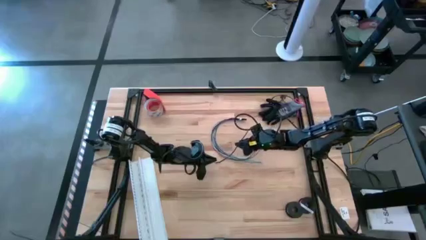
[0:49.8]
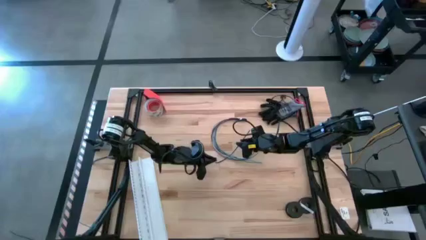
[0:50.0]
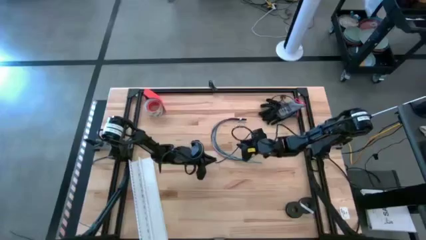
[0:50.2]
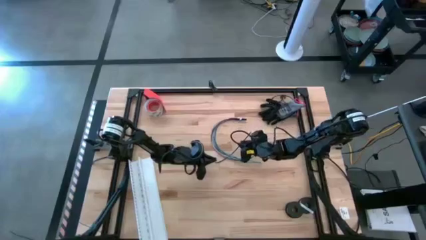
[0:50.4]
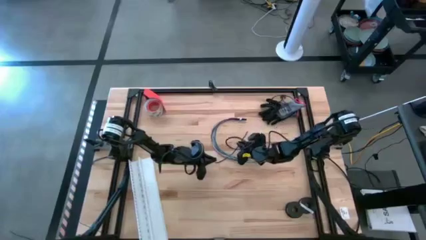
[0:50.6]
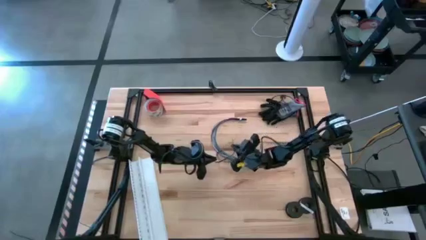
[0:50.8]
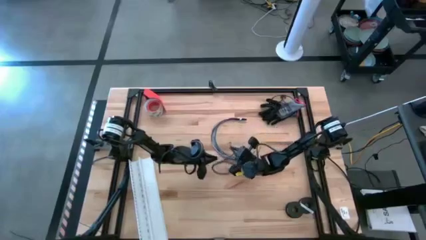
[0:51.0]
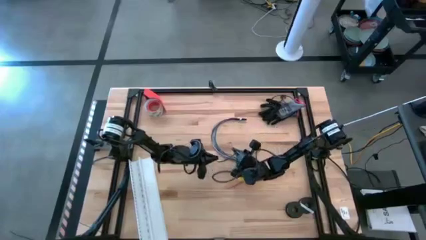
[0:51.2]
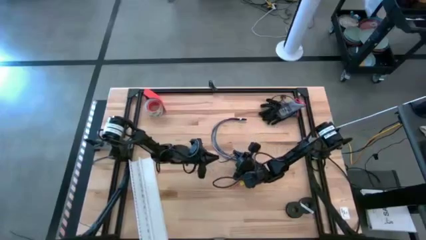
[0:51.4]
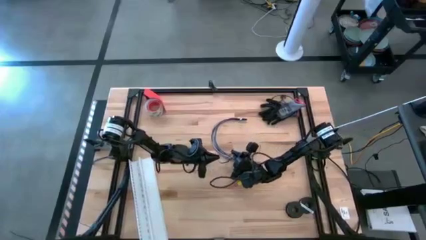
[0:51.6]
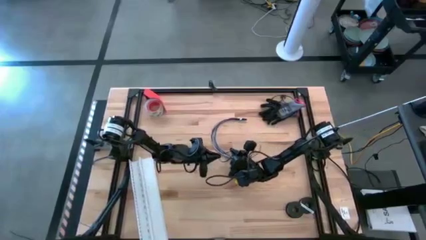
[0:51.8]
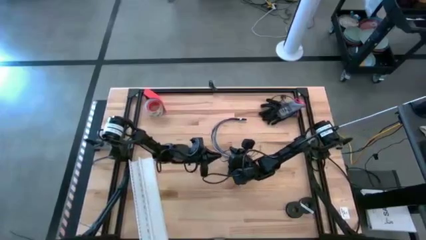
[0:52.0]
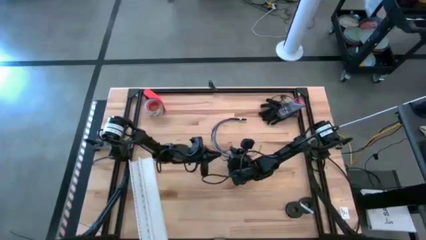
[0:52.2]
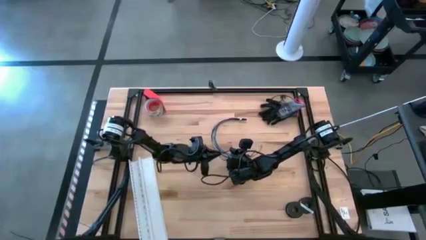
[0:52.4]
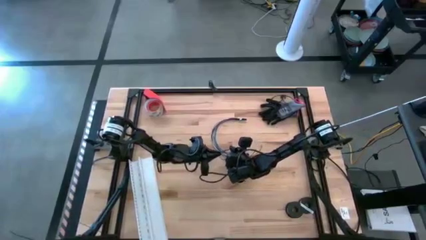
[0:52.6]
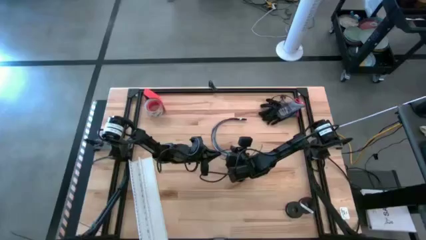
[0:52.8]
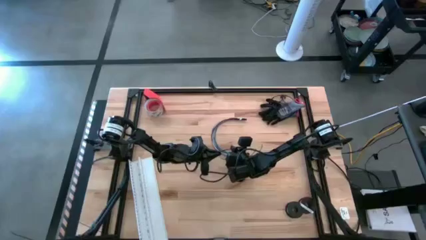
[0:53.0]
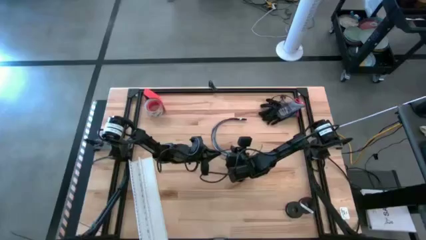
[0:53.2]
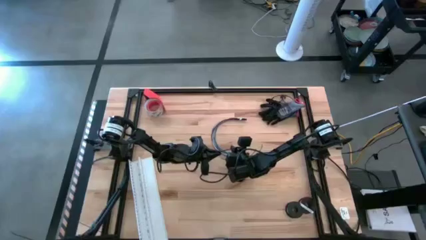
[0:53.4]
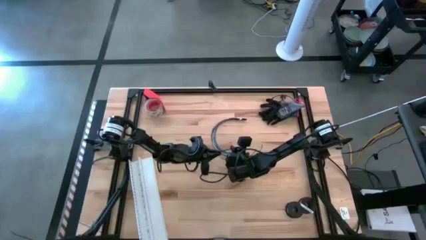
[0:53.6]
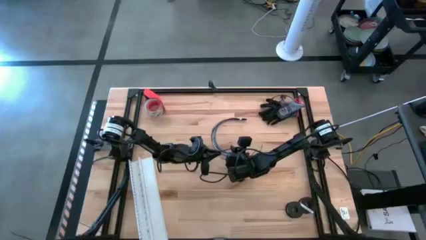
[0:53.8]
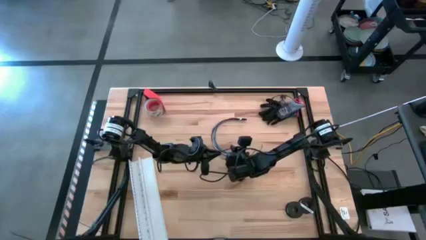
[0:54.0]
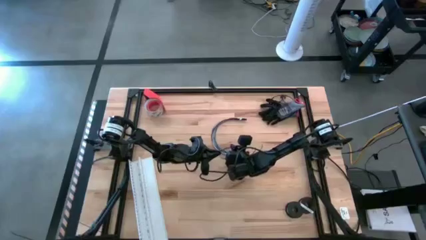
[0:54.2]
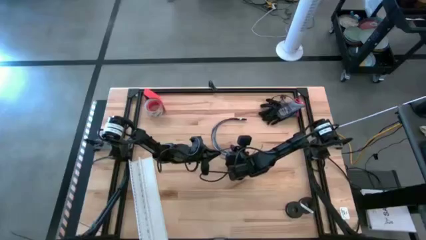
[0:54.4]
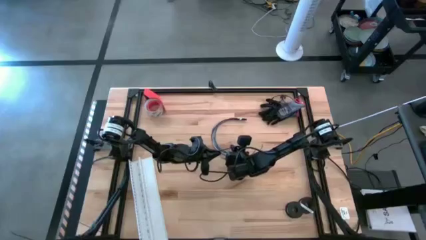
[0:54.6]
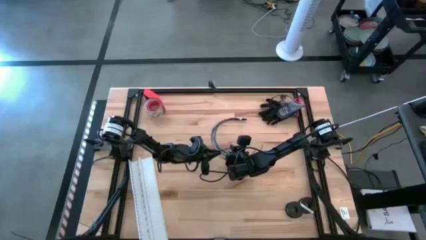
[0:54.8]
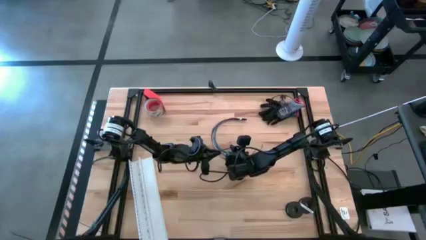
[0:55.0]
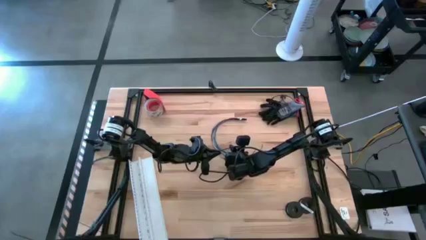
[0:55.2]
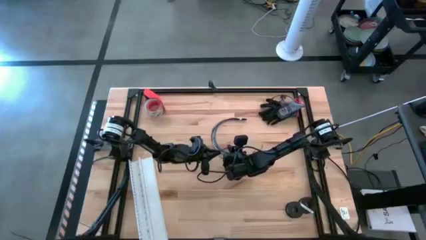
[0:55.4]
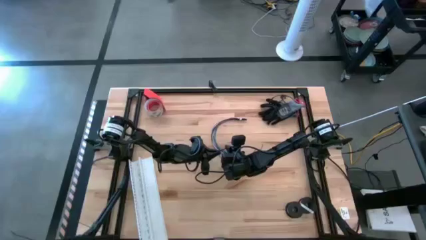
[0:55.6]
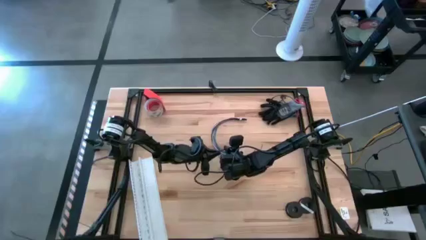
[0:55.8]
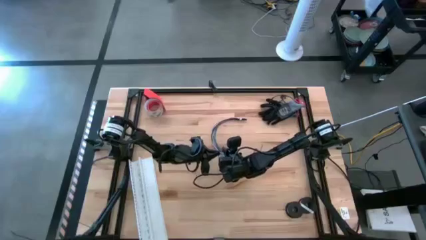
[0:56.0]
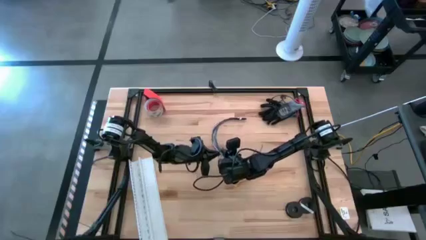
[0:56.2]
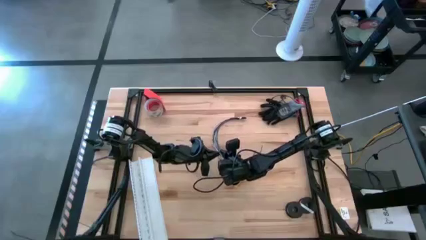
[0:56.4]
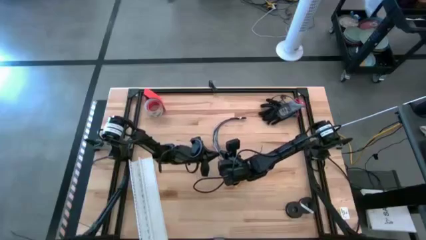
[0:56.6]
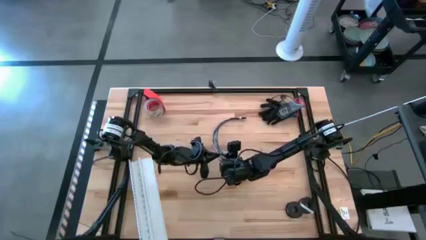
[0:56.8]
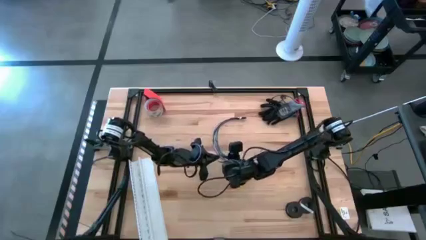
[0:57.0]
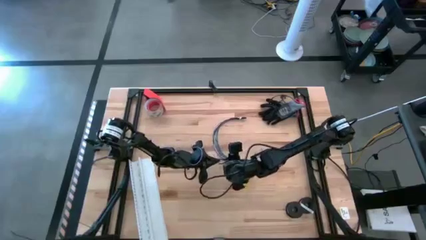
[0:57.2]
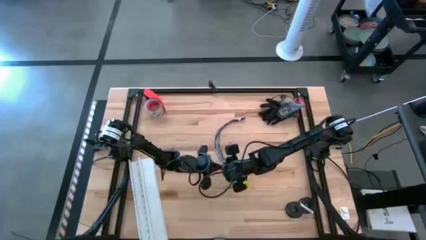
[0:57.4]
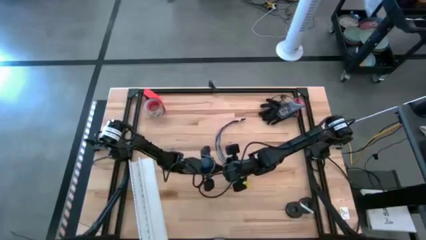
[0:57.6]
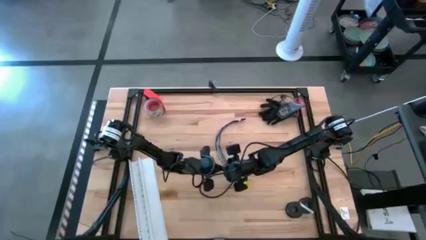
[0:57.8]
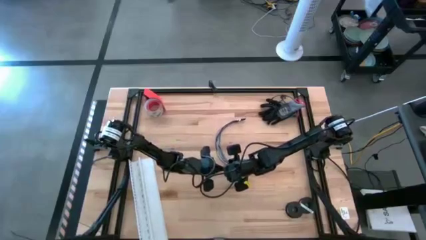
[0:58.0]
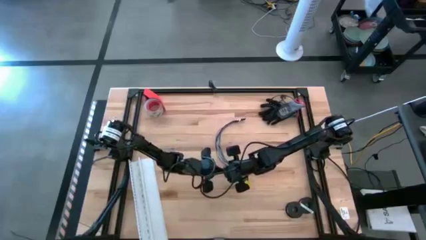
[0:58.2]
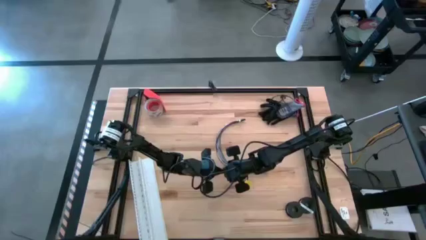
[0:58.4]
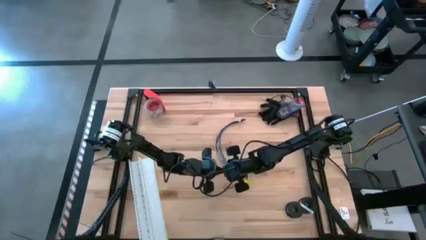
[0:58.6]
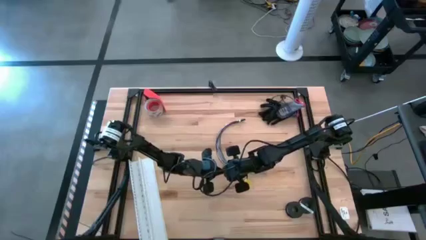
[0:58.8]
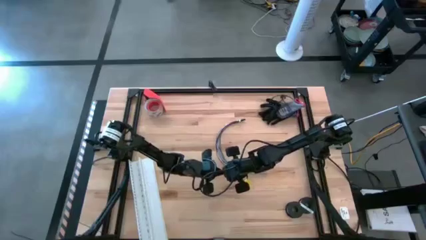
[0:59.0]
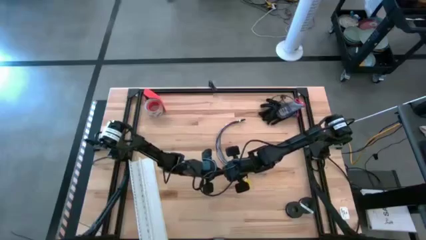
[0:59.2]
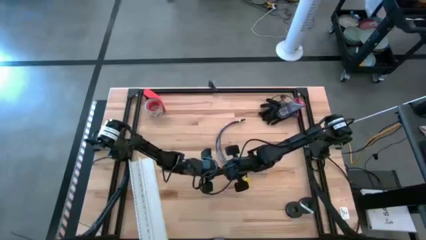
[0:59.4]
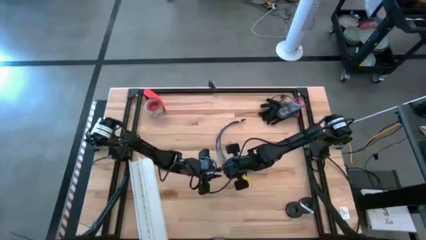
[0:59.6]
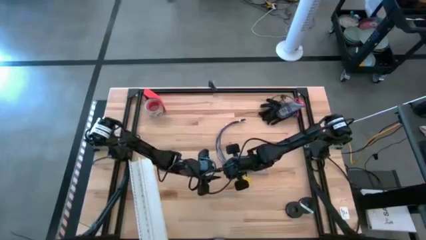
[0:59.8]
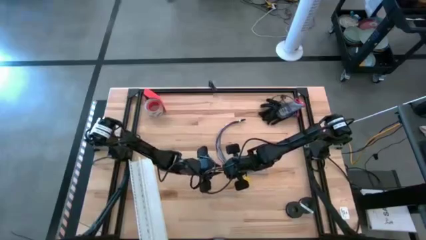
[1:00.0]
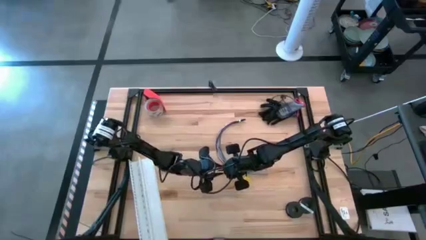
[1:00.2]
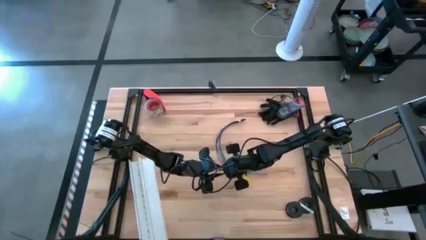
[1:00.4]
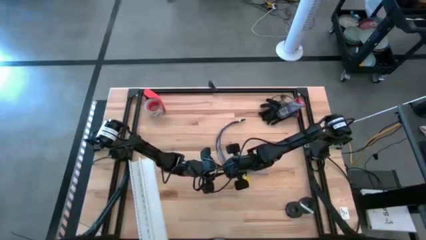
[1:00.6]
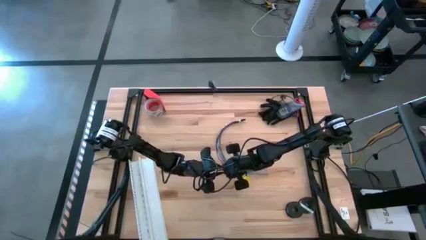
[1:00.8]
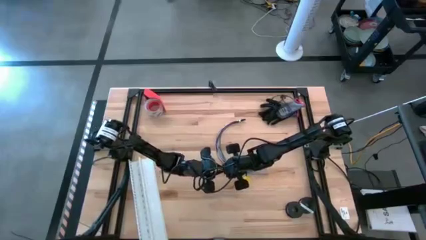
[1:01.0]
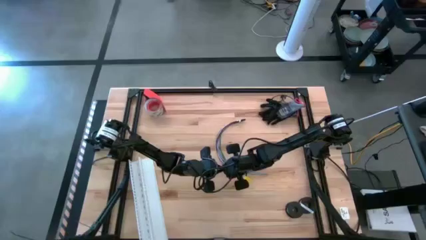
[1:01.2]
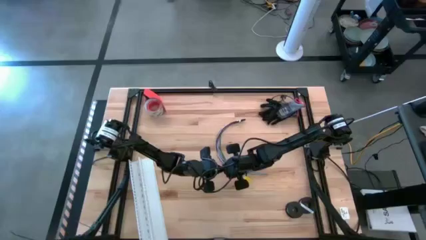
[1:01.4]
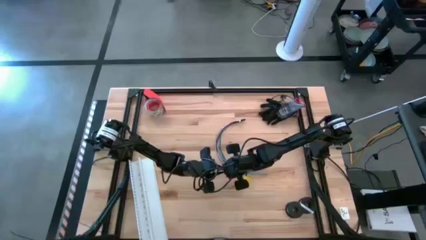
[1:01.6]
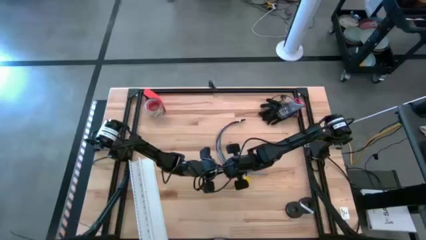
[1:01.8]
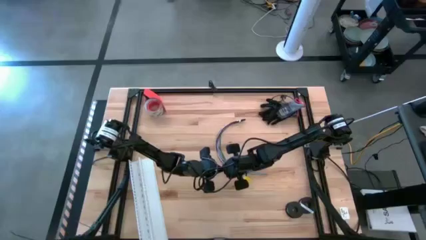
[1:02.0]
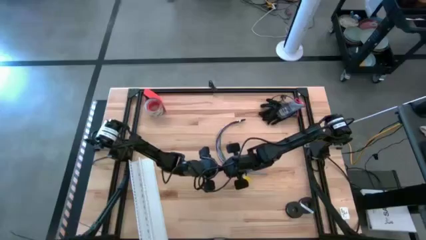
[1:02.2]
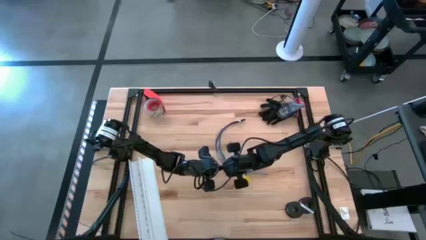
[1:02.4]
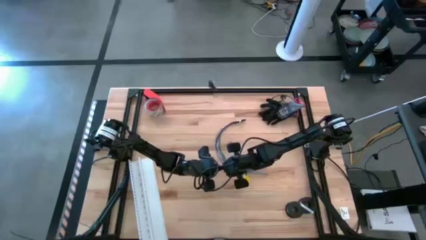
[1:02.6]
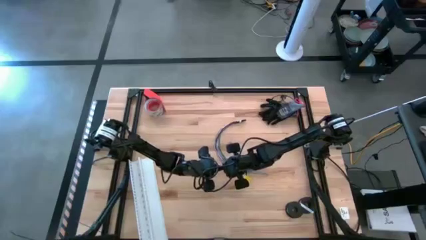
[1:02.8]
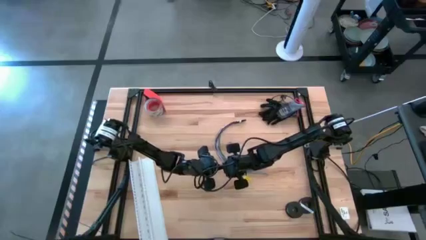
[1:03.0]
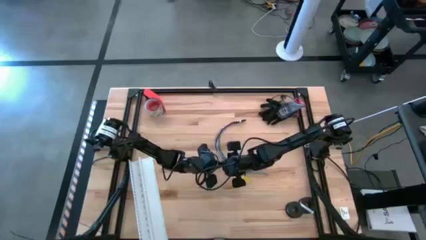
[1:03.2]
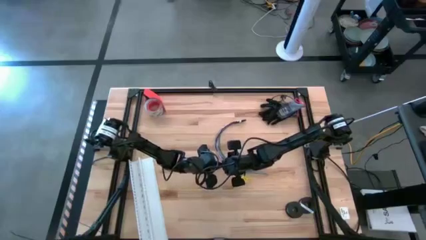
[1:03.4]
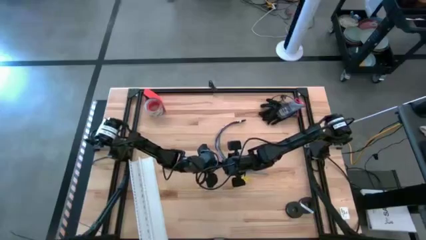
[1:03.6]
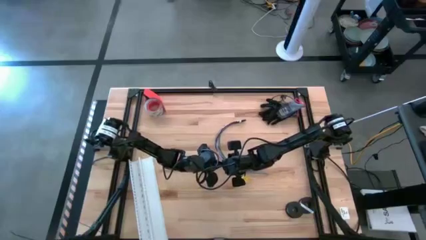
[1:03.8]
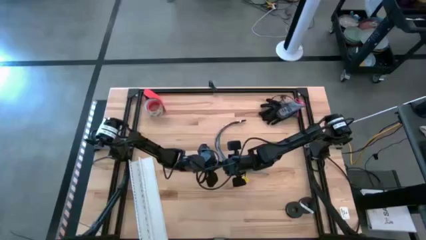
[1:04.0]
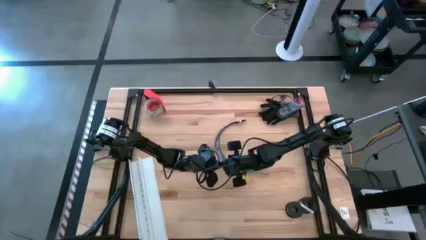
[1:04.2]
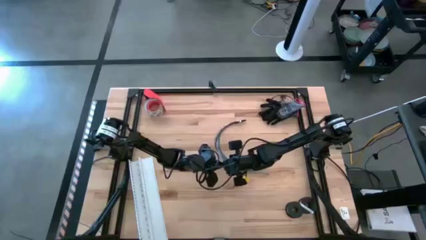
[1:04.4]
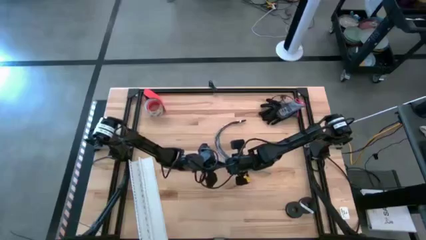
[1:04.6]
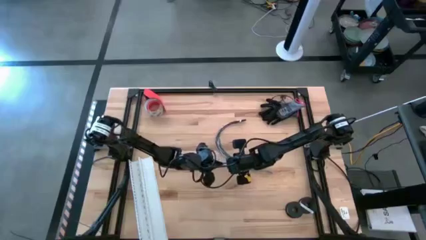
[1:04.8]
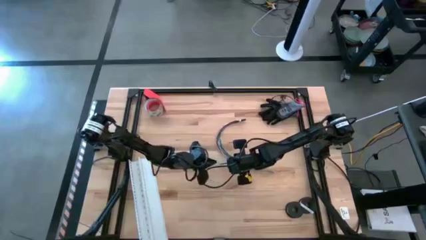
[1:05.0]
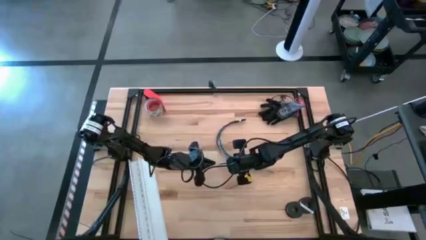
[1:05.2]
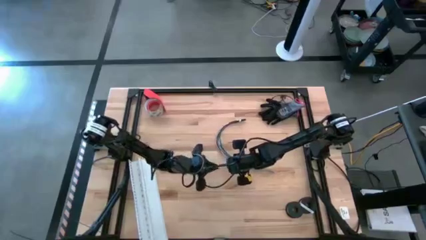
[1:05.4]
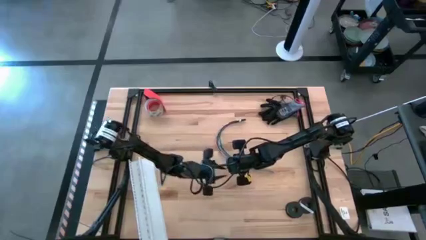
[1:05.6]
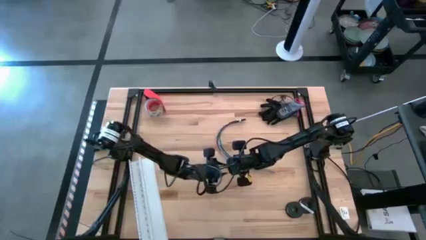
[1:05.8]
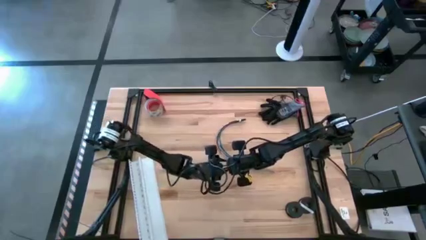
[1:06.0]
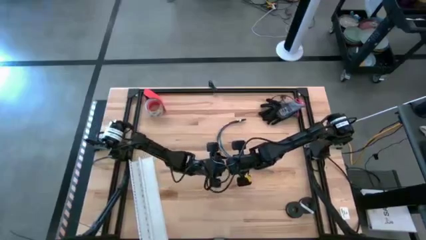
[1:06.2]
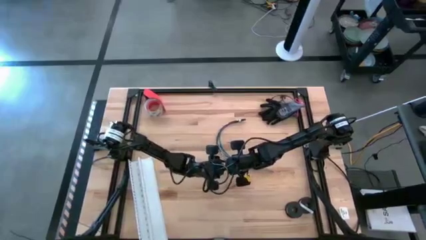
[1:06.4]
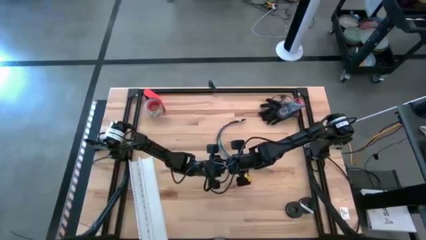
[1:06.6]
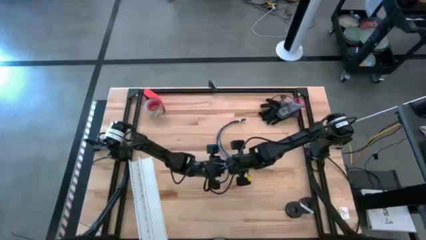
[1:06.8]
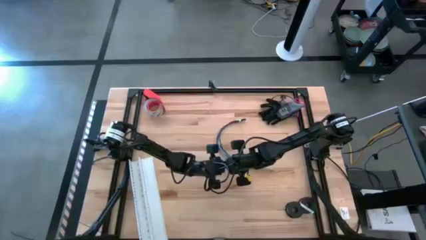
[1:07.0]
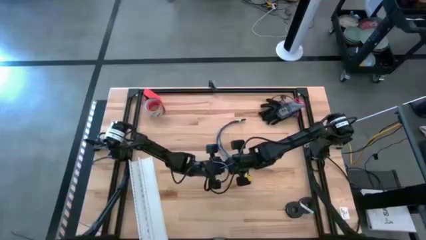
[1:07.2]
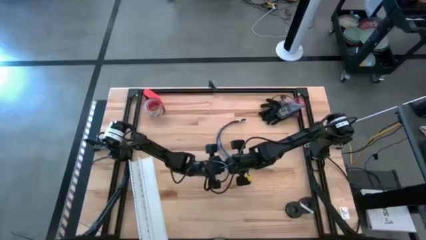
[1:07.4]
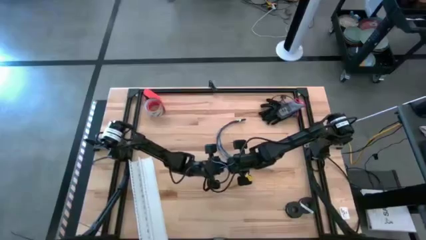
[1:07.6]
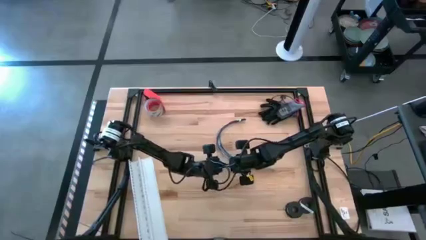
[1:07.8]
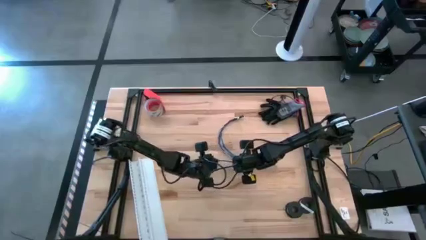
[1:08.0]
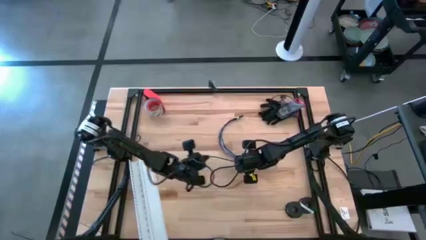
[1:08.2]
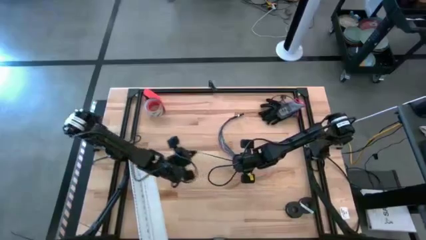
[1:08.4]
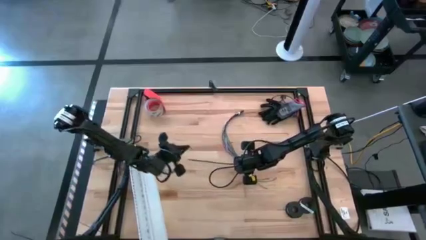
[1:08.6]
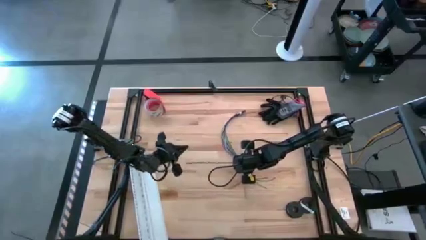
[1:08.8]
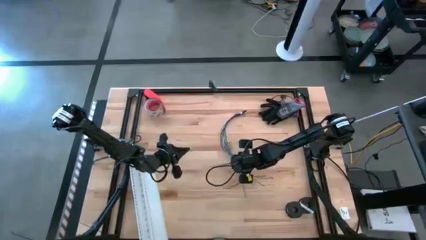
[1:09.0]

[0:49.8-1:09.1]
Task: Ziptie cables
Put a zip tie on the cables
